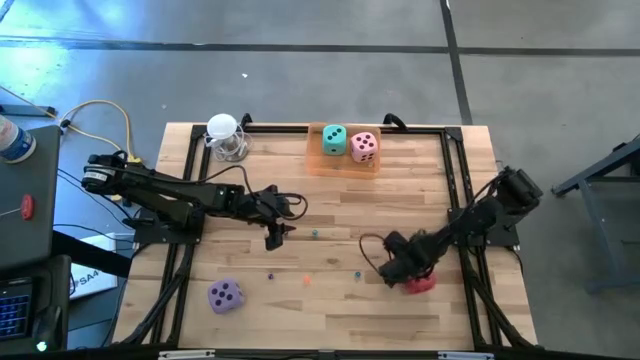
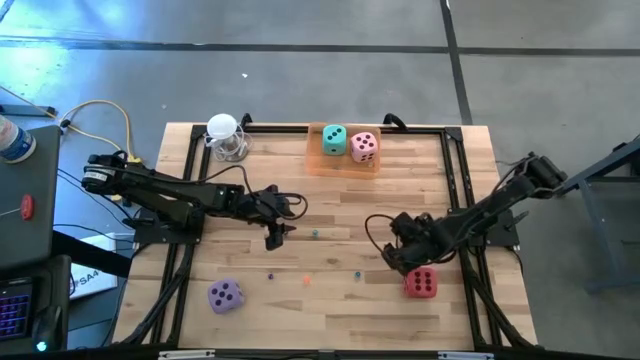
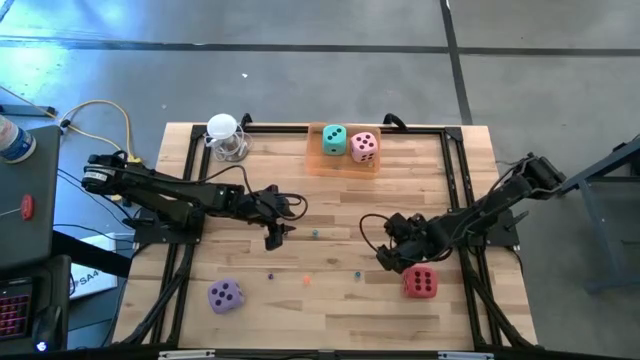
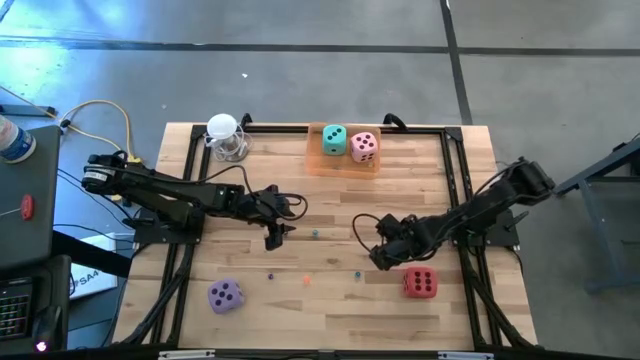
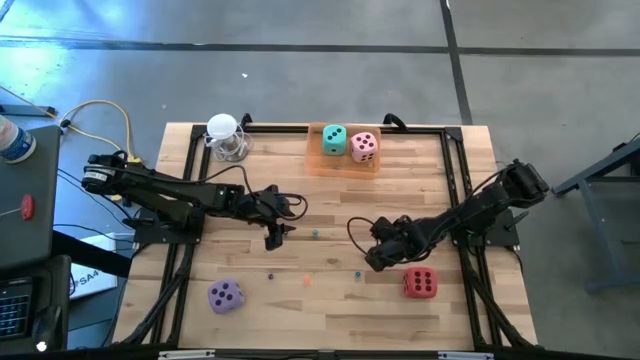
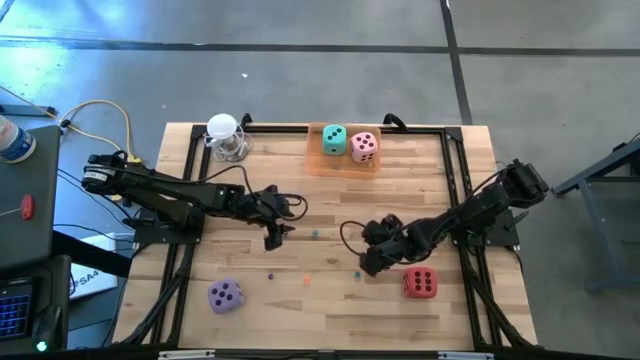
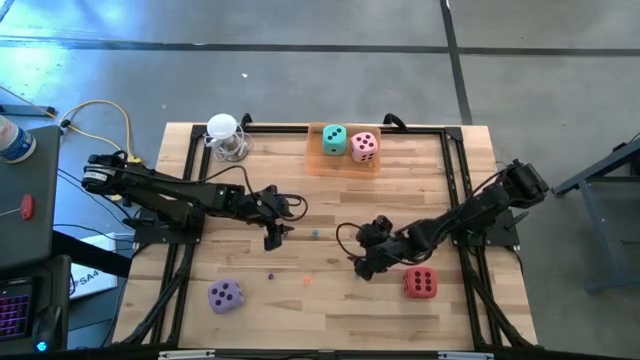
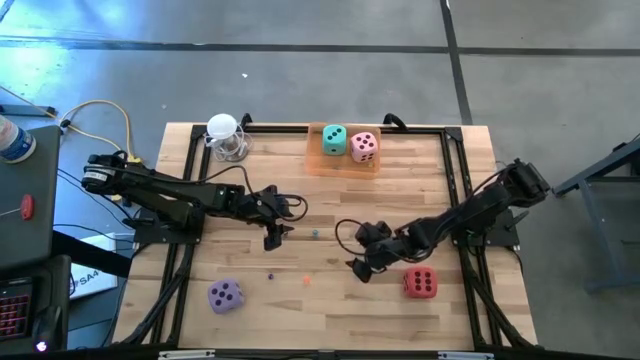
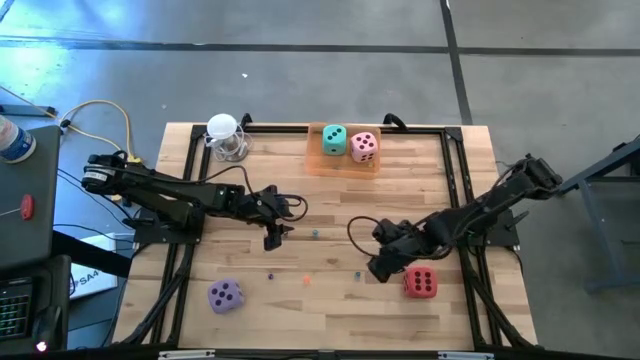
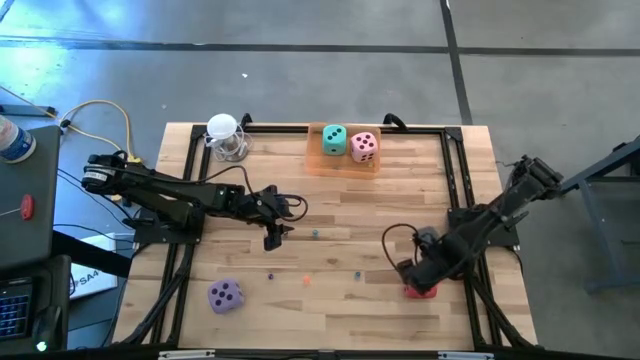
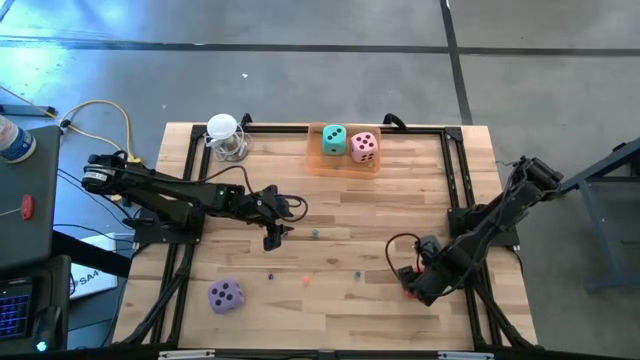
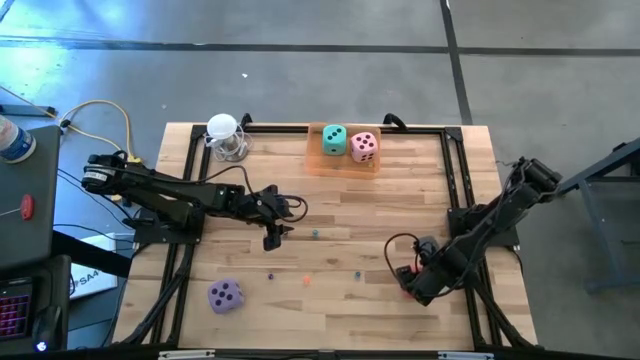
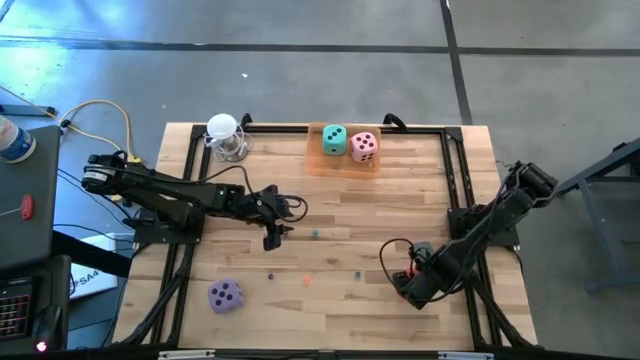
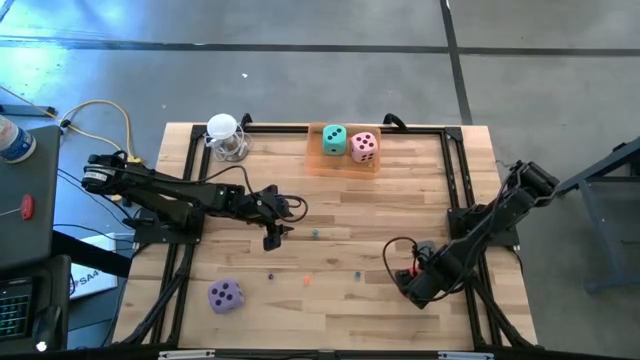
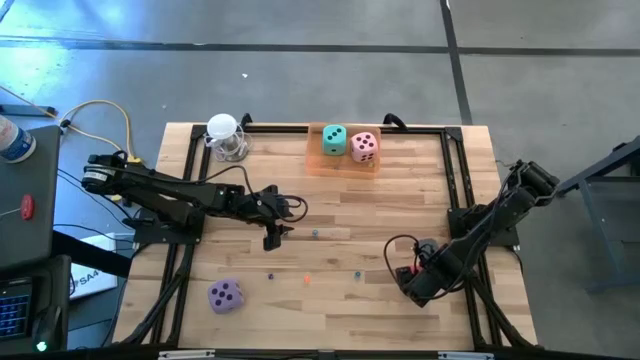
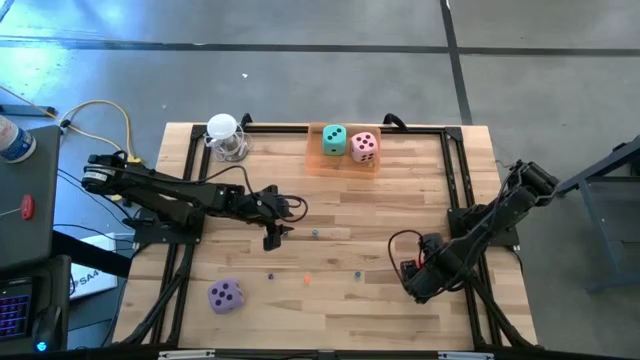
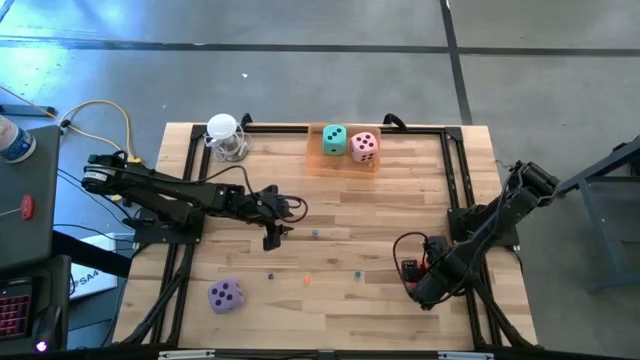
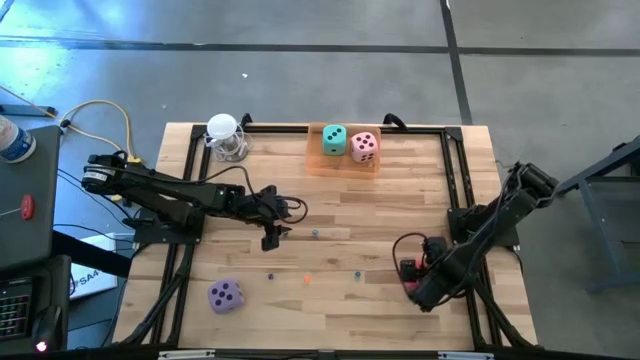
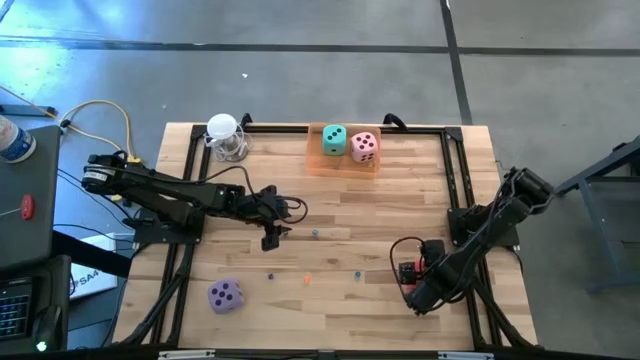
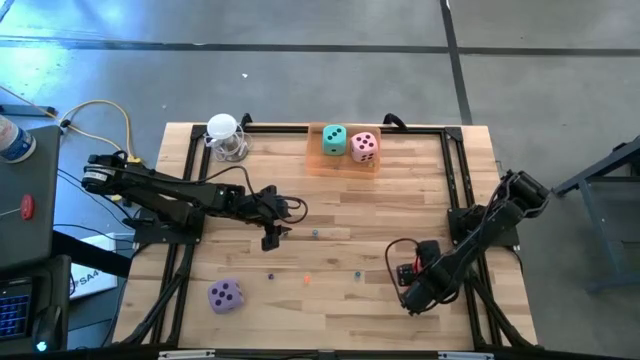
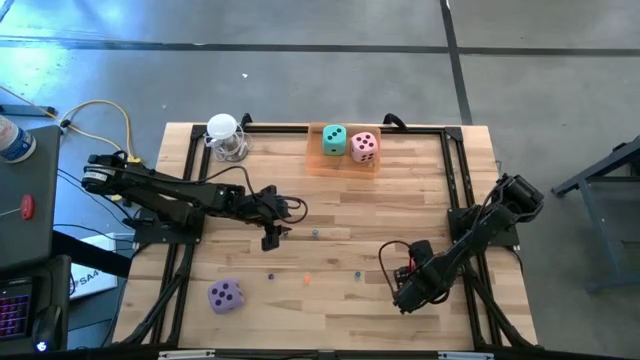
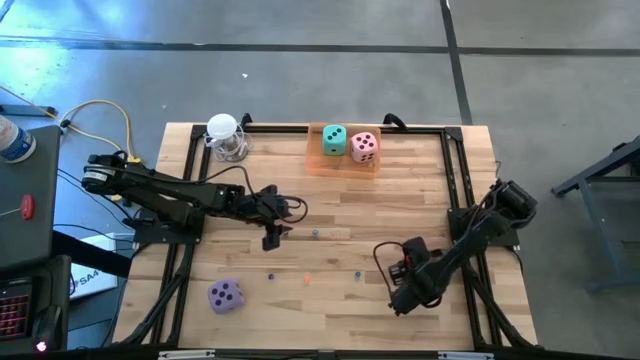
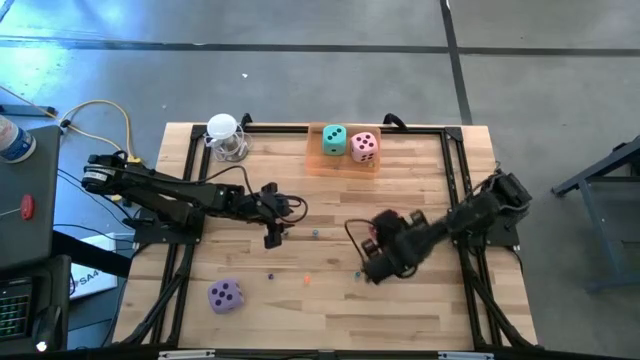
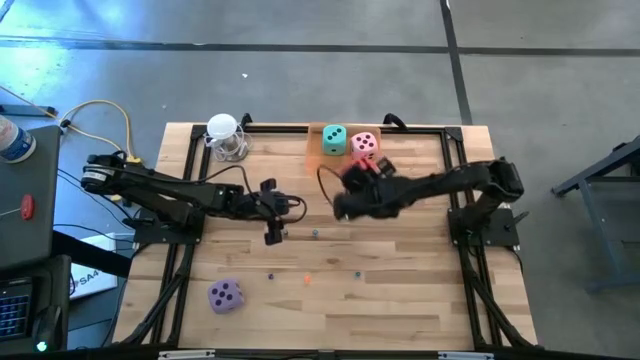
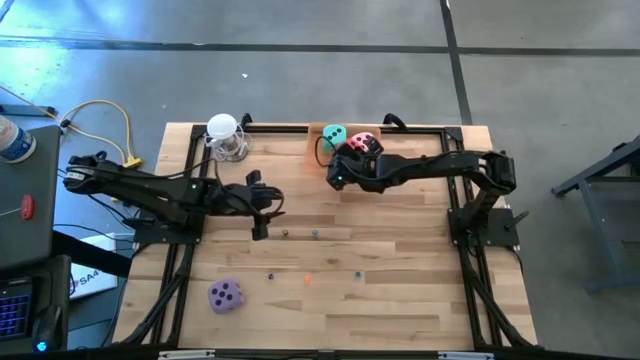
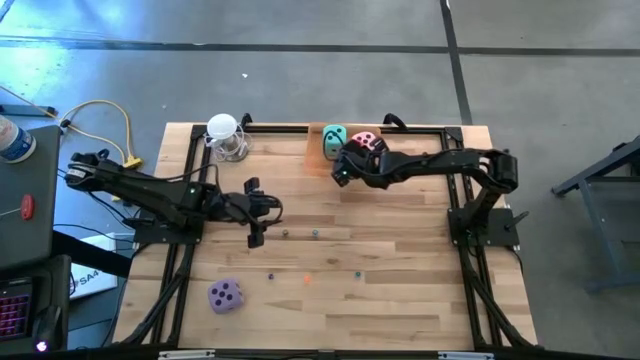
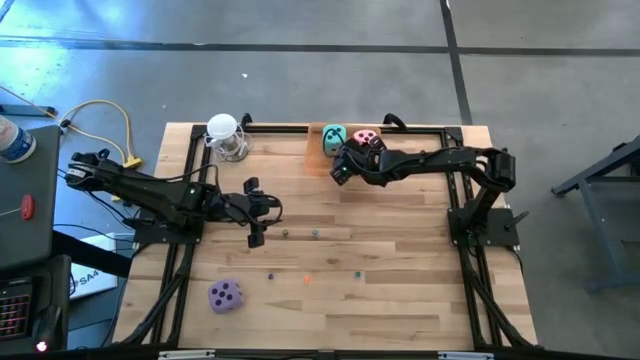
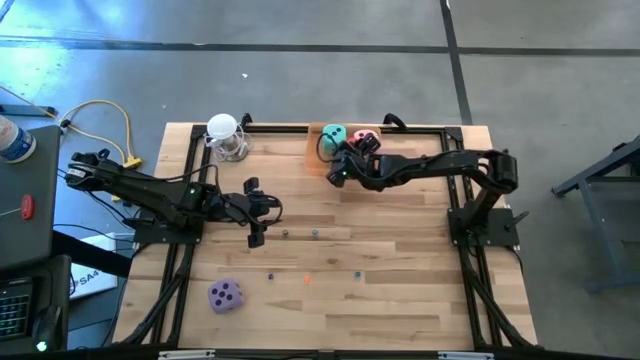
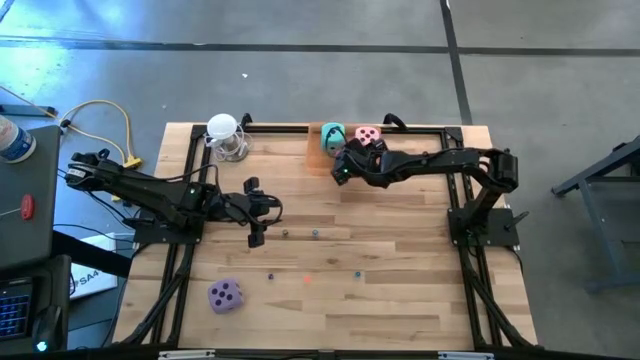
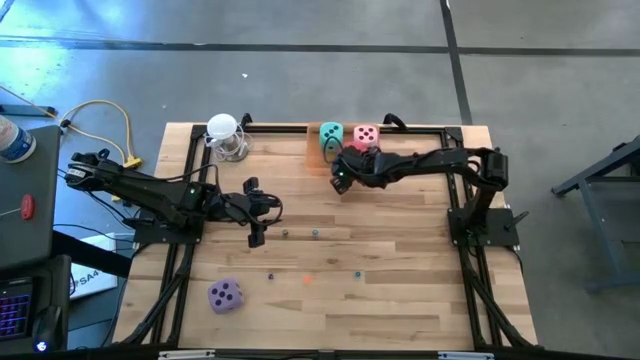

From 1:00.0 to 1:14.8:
Task: Pick & Place Dice
Put the large red die into the orange bin

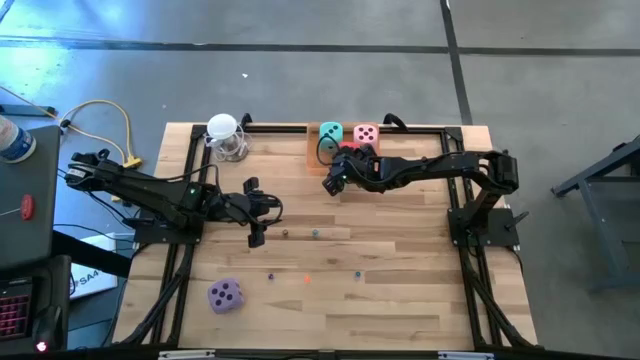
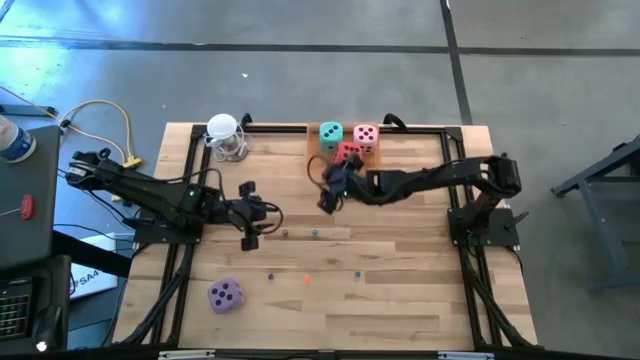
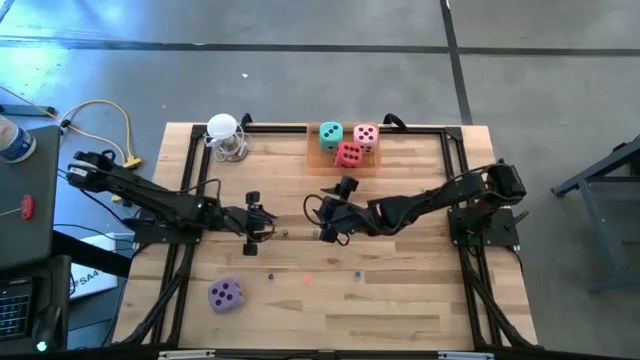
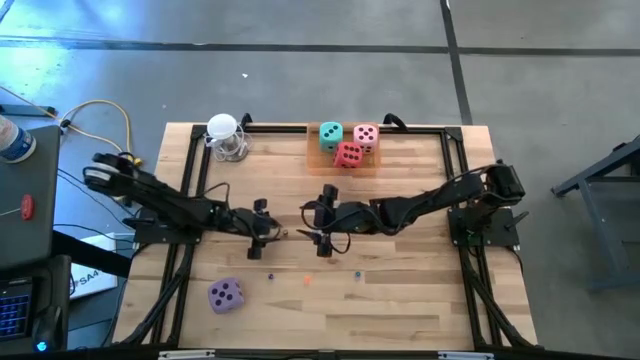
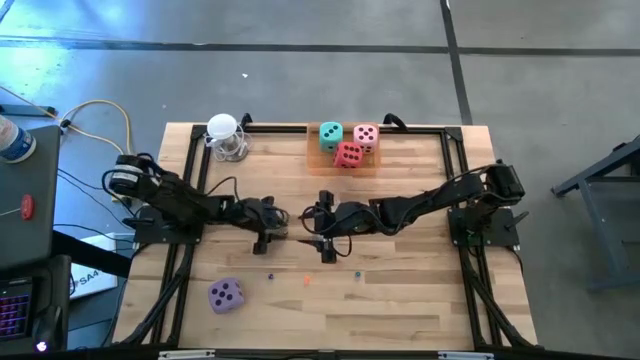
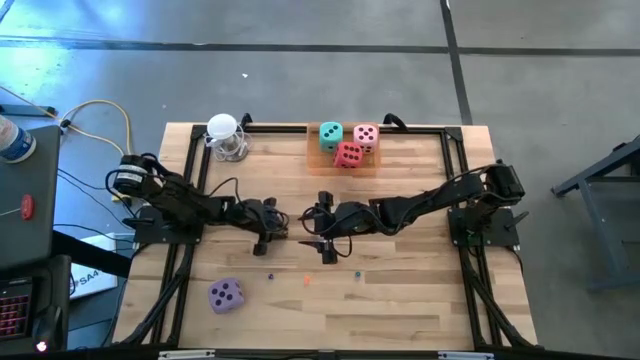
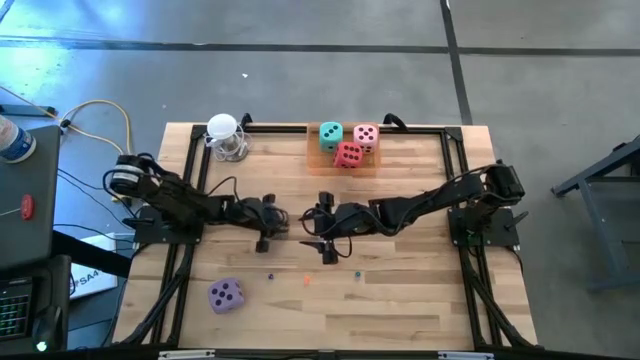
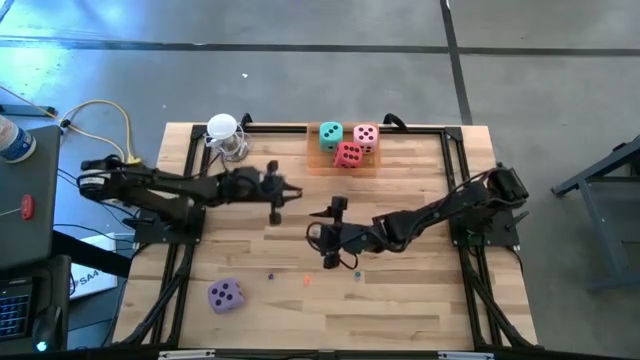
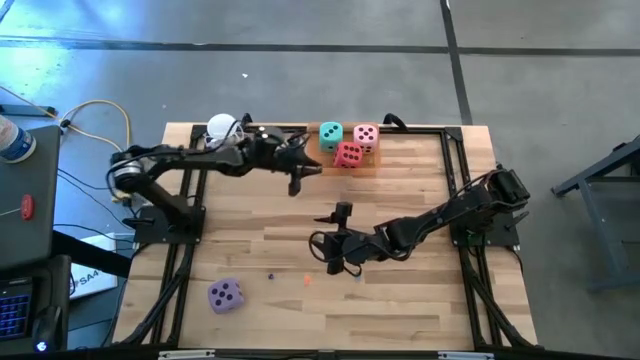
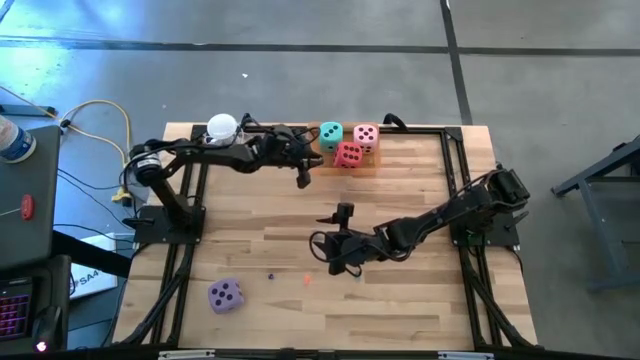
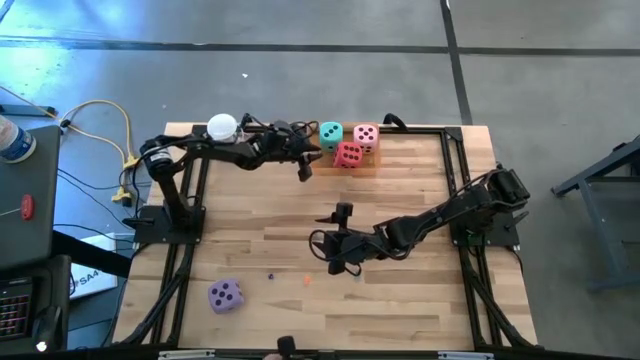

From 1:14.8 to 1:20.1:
Put the black die into the orange bin

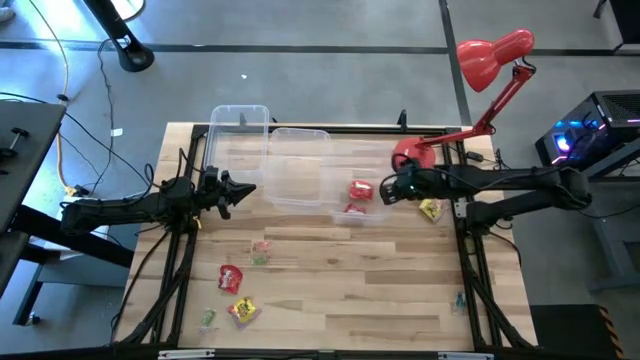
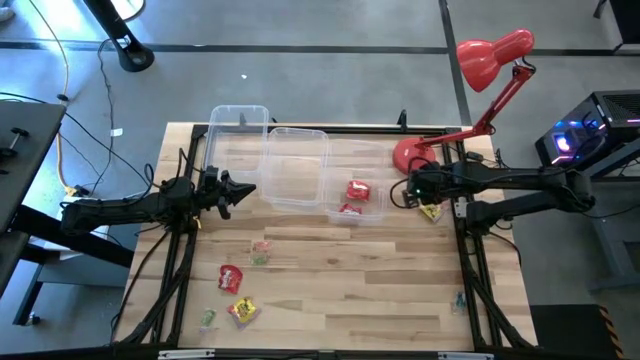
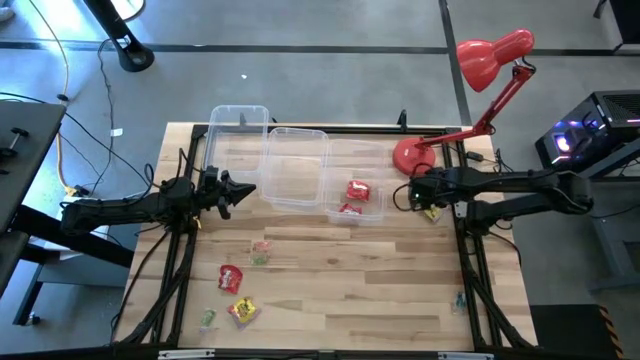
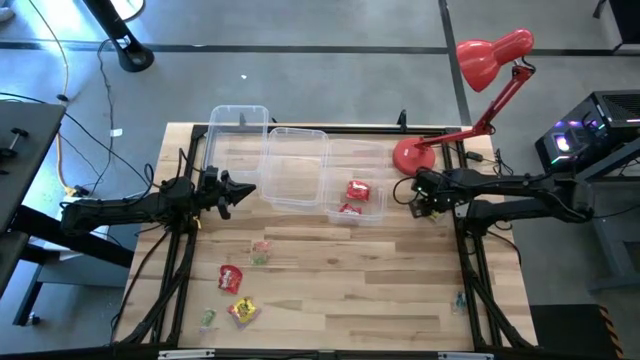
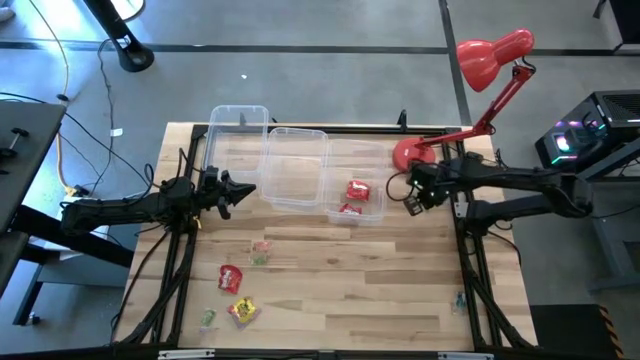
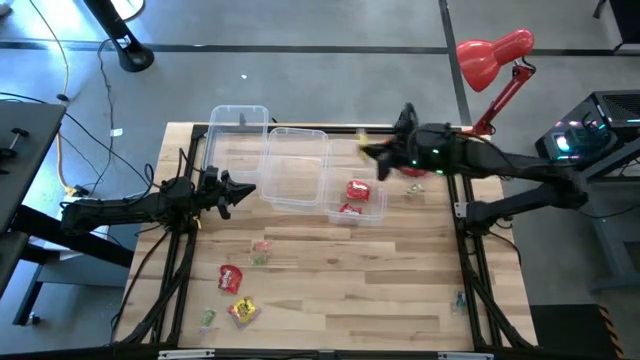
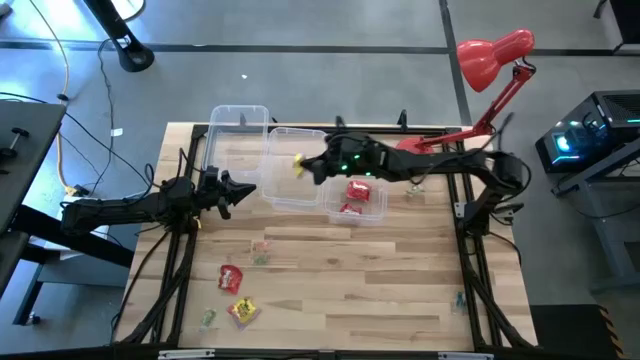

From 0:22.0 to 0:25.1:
Task: Sort candy
Put the top yellow candy pack into the center transparent bin
